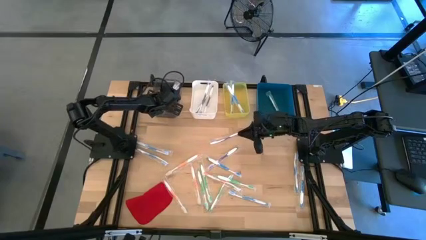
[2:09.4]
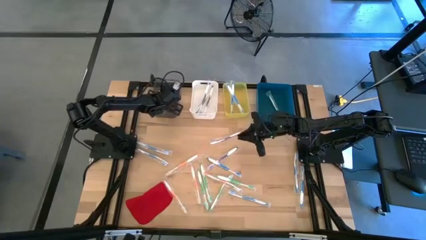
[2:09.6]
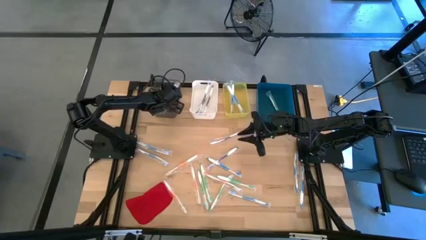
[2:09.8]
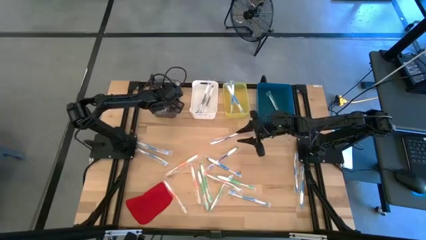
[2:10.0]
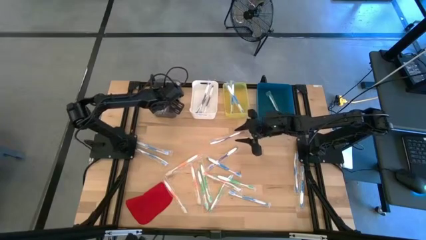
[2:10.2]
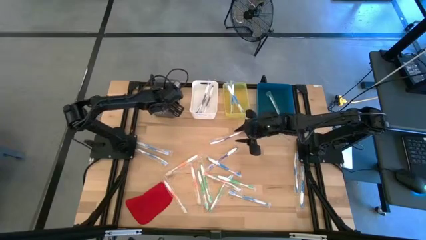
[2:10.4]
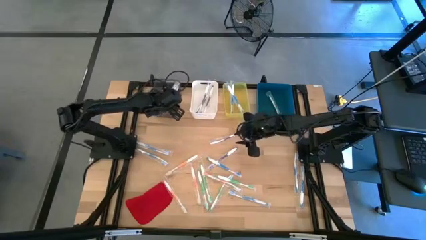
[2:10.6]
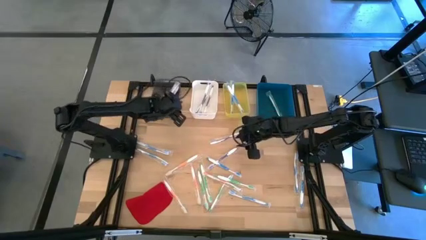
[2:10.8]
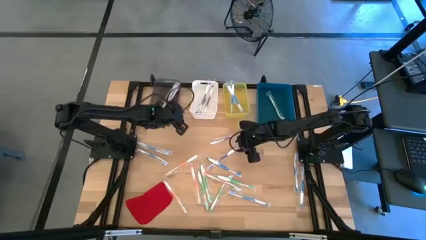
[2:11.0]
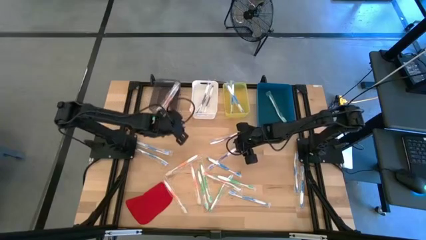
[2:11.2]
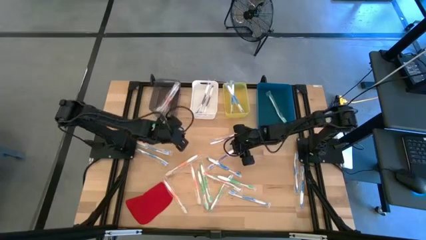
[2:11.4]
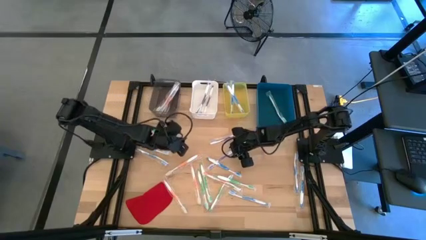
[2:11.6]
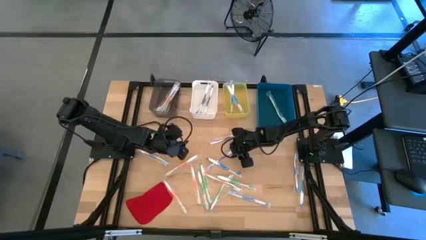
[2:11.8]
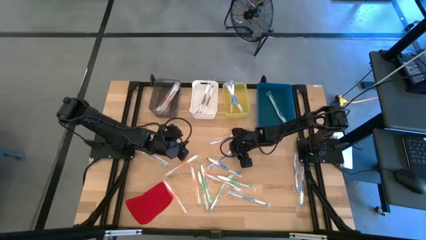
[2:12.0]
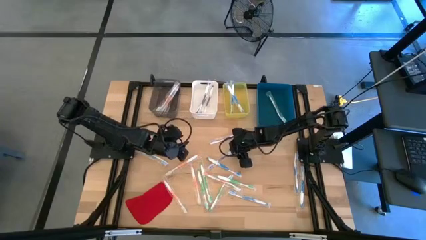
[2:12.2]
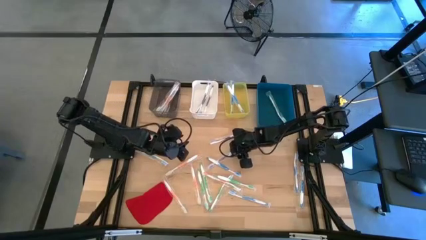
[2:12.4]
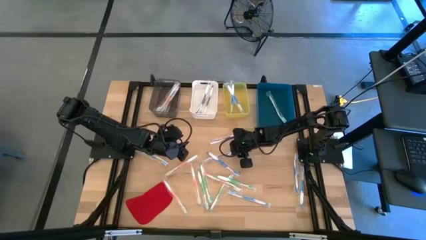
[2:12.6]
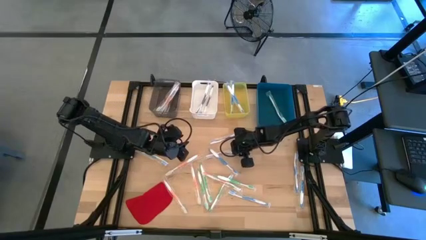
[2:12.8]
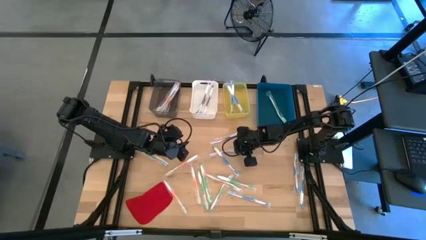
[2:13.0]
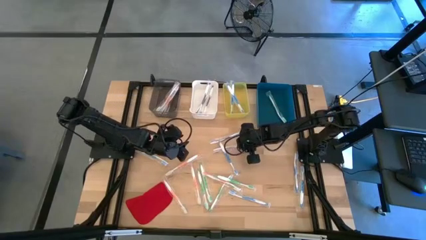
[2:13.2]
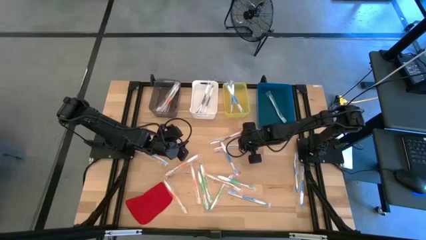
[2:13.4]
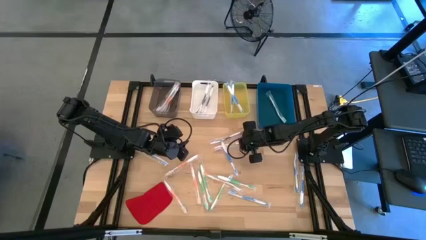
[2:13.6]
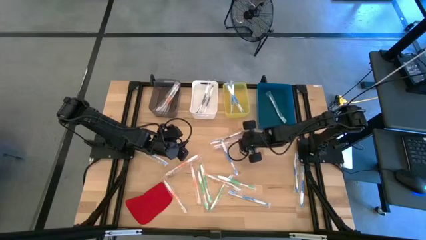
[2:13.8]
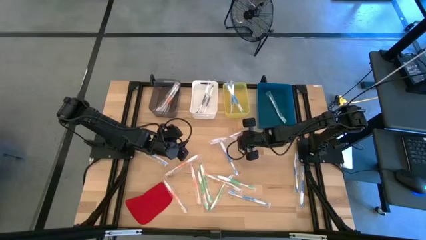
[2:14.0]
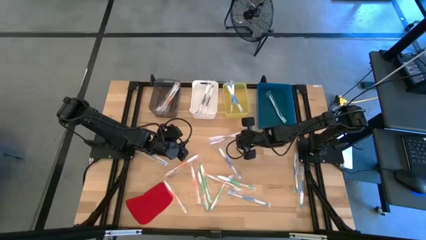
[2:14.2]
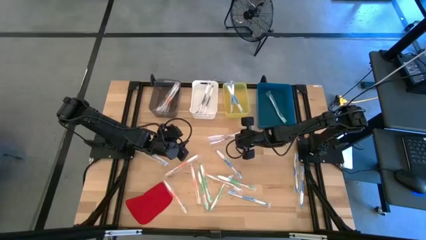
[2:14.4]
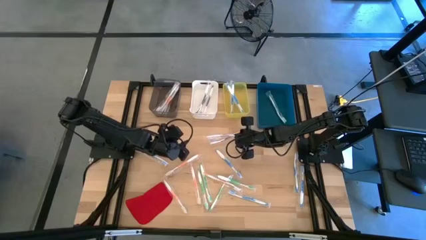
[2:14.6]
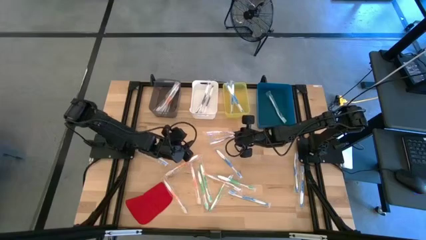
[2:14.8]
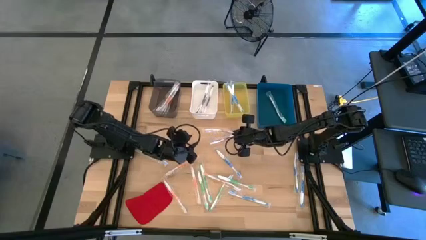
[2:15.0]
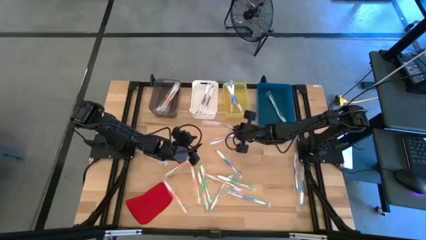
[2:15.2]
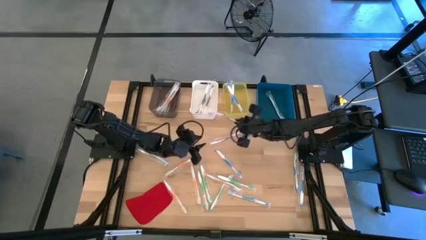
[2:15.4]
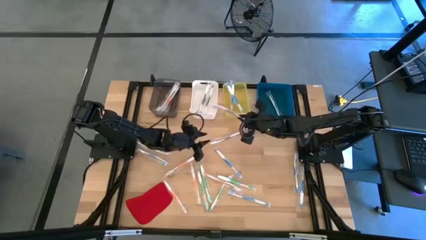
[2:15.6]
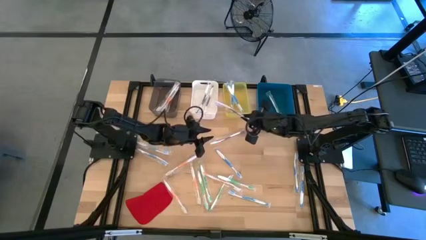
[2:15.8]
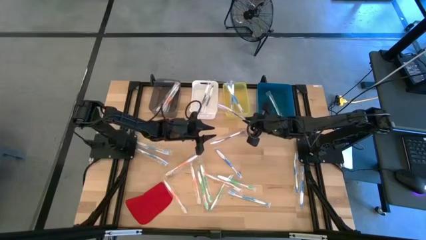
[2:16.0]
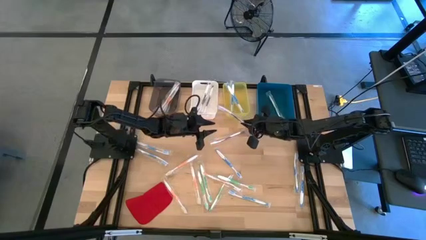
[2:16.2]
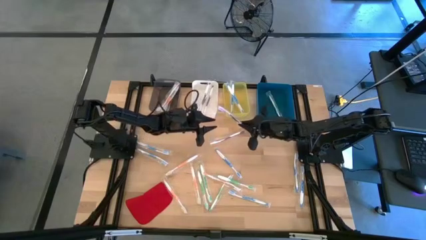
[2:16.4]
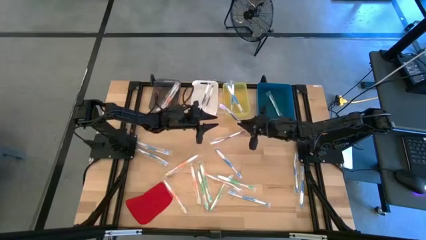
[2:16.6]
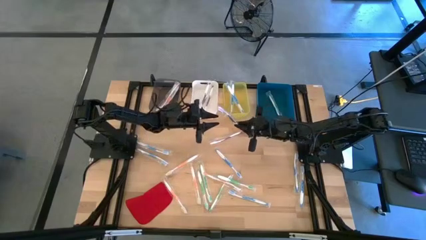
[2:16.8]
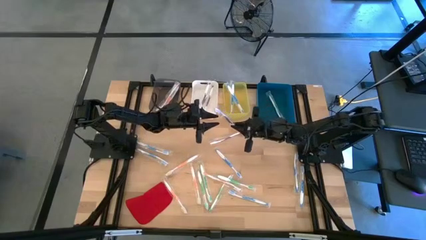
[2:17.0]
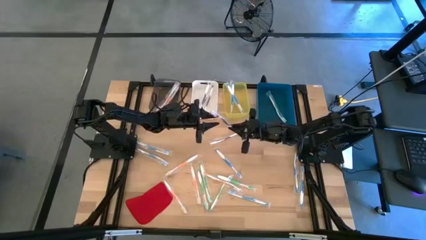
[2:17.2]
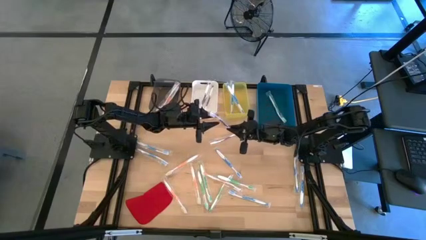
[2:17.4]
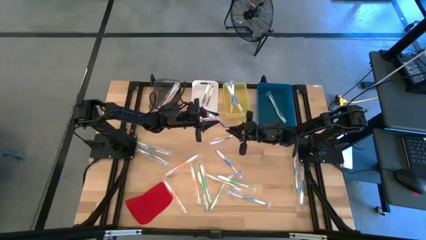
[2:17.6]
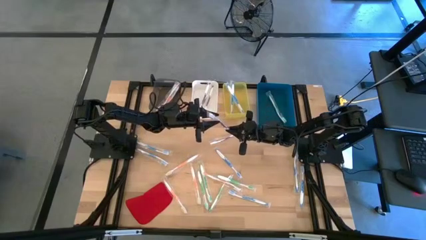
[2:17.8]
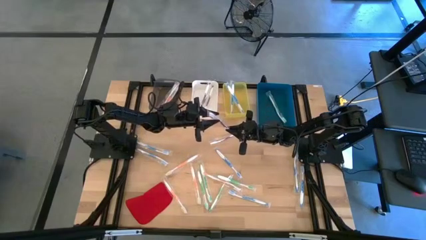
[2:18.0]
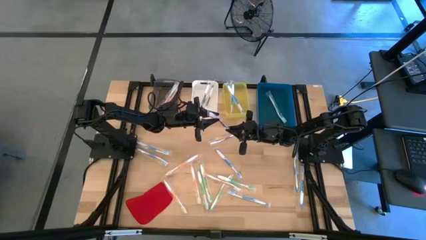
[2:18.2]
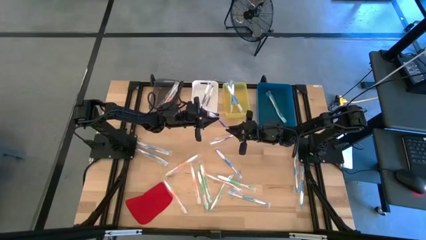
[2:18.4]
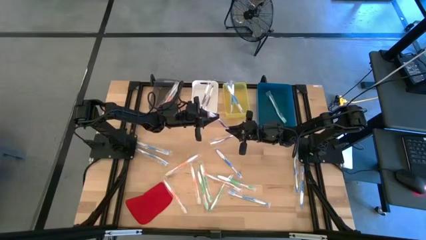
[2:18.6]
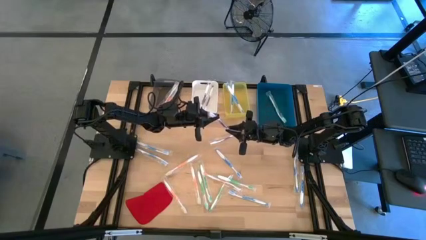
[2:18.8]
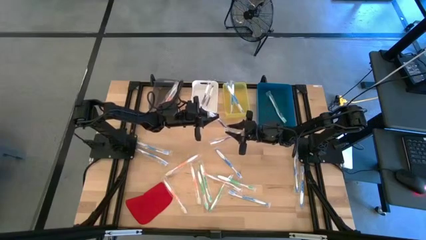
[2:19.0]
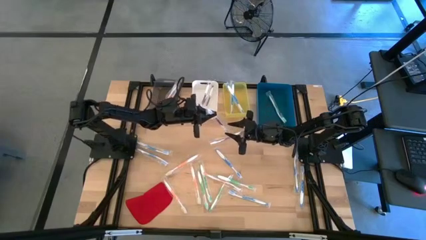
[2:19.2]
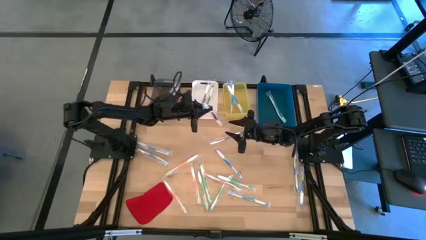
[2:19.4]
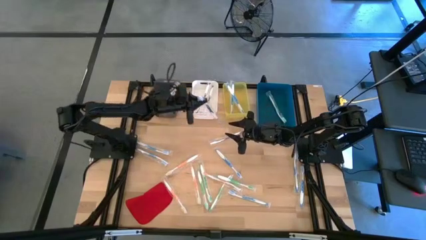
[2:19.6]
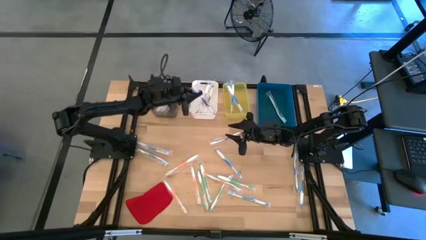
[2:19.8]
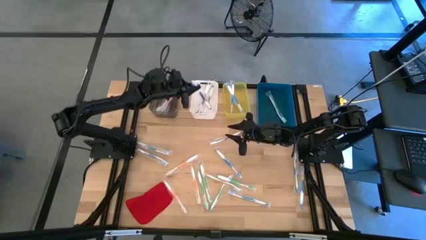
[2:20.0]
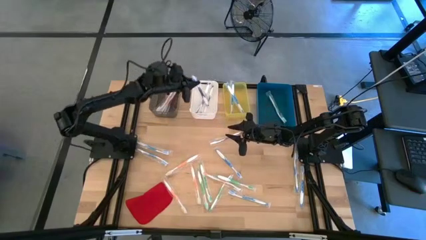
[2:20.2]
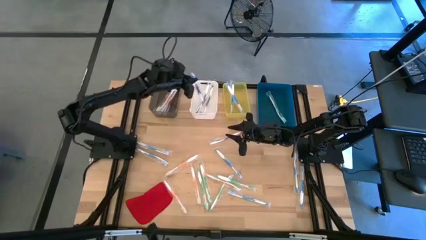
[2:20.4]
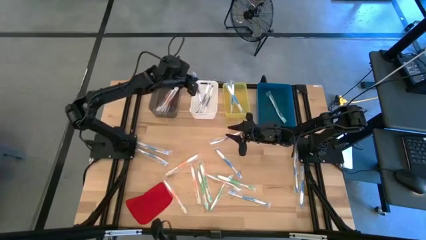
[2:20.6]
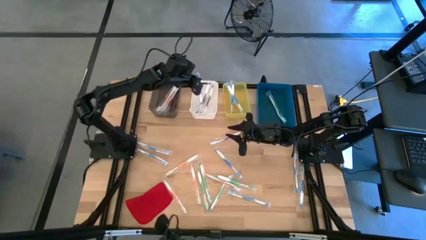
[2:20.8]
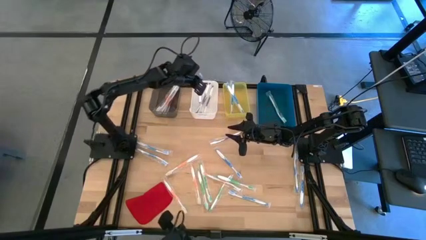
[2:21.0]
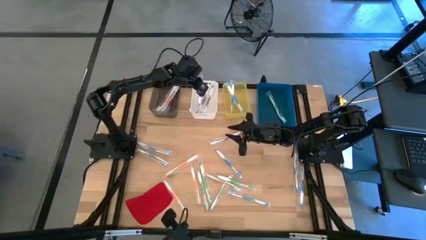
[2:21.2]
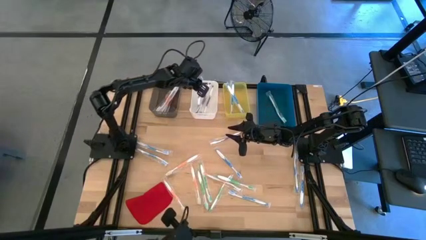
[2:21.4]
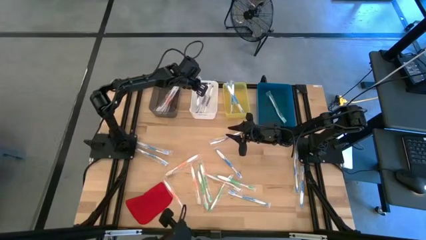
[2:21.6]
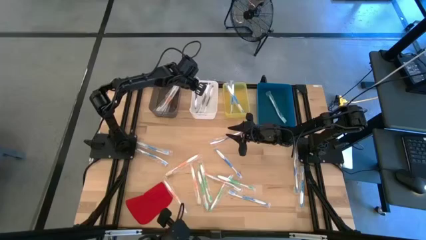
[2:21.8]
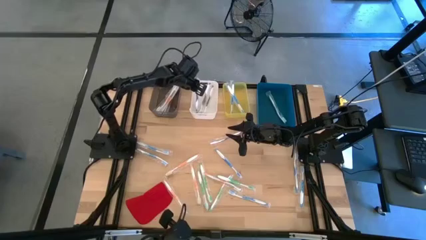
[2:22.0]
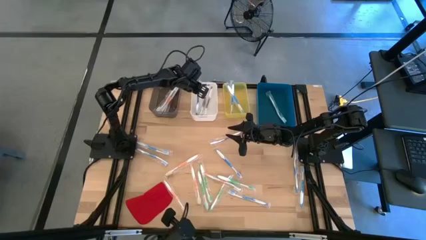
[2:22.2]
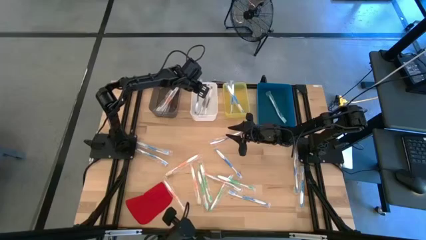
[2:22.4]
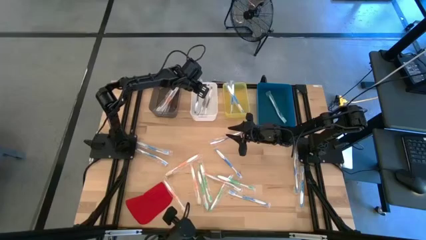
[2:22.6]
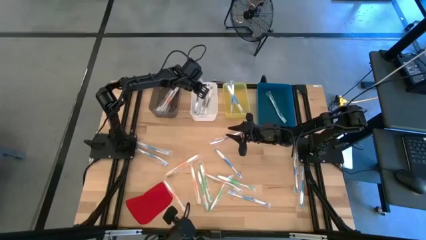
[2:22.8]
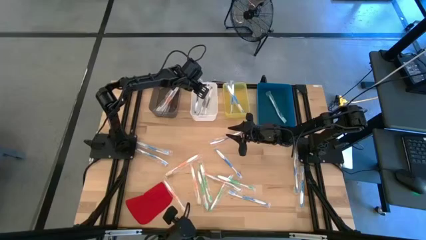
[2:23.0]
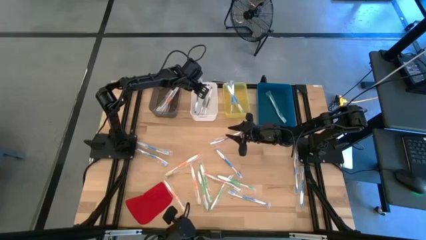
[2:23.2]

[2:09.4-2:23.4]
Task: Pick & Place Toothbrushes
Put the violet toothbrush into the white bin

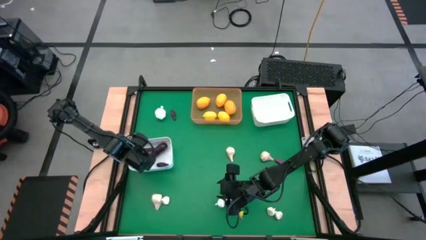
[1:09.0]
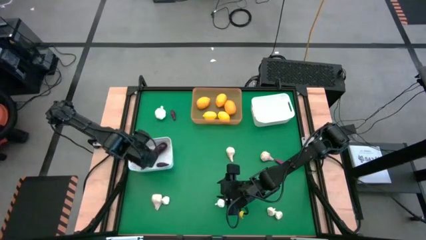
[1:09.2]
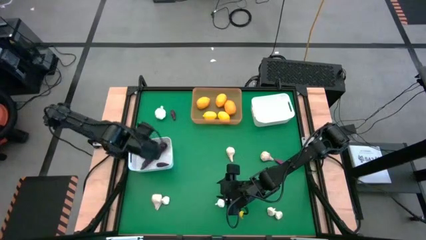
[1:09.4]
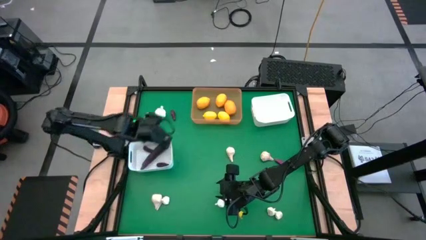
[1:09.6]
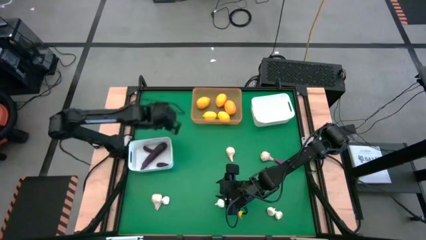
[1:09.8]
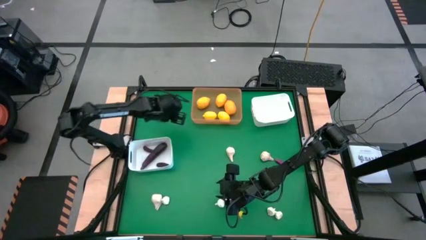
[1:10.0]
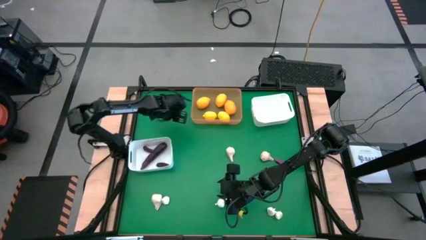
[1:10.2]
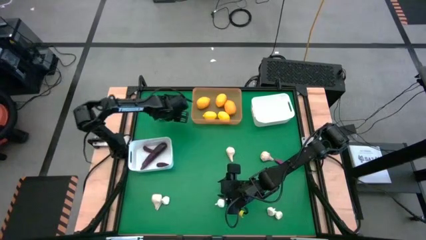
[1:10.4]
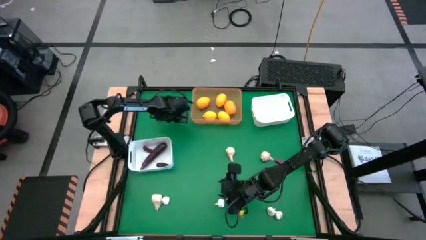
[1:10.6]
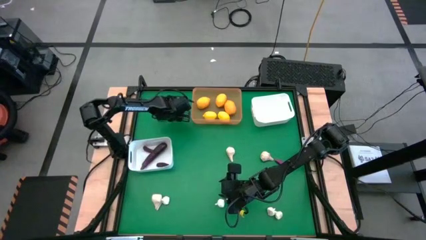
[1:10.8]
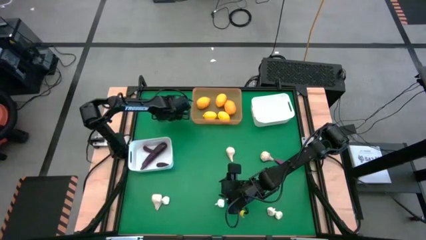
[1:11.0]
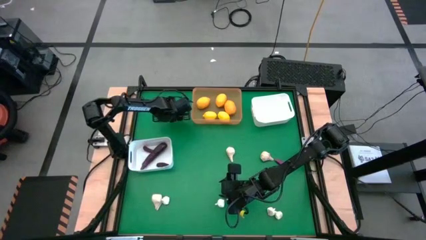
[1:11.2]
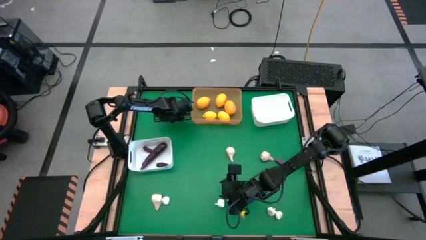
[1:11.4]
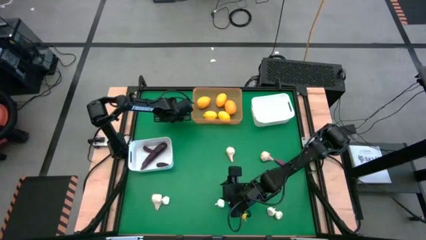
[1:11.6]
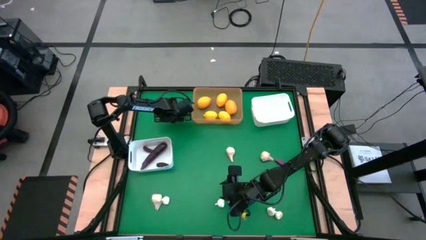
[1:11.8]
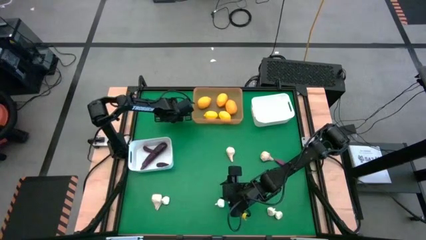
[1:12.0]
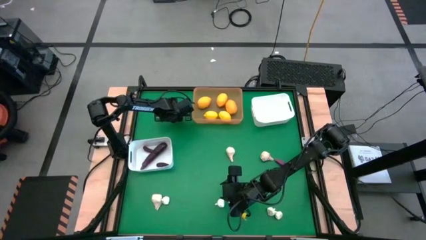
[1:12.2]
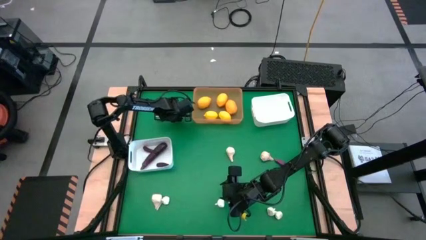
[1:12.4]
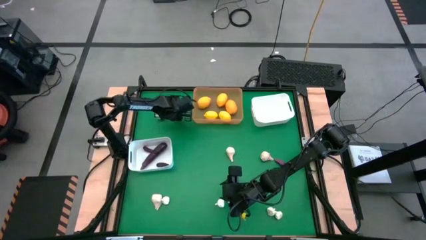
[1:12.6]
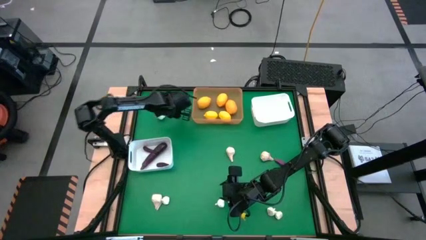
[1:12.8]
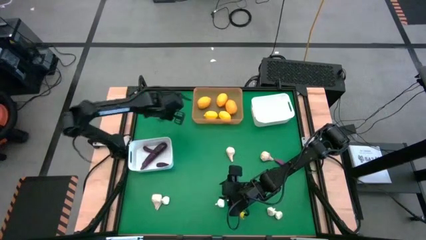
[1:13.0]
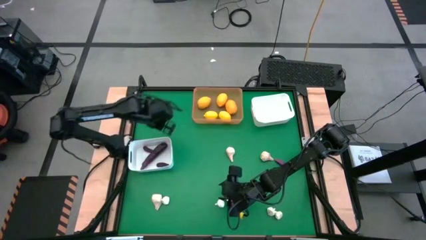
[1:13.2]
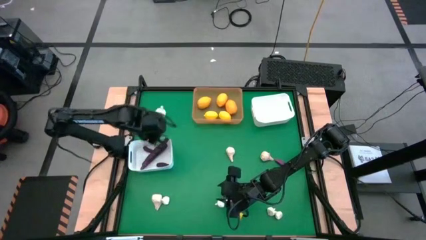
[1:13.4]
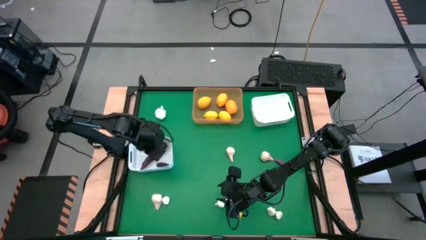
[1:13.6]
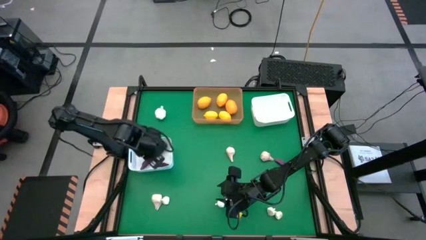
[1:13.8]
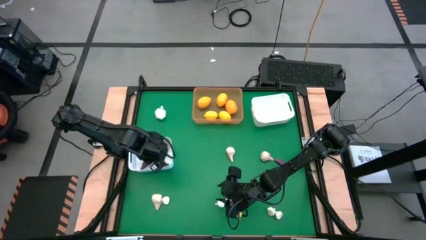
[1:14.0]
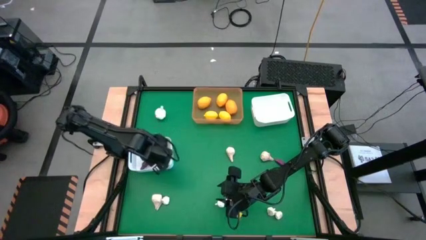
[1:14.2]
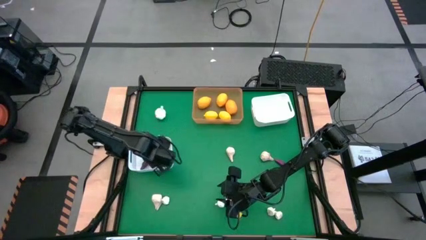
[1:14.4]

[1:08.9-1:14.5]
Task: Sort produce into baskets
Put the eggplant into the left white bin
